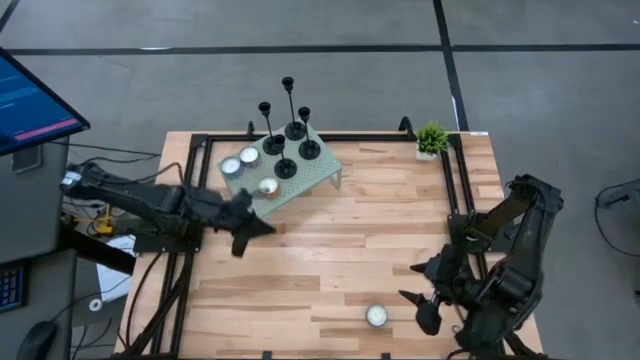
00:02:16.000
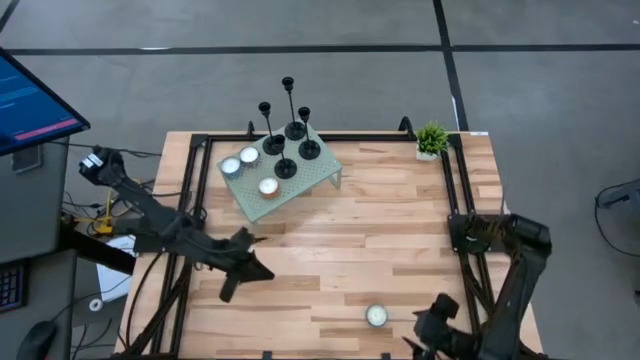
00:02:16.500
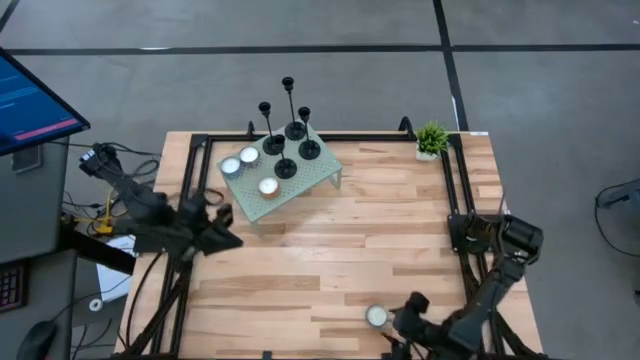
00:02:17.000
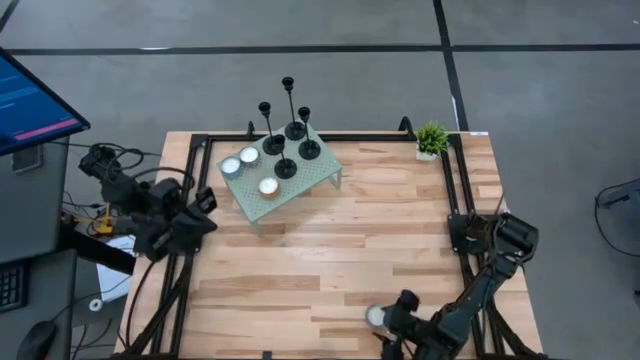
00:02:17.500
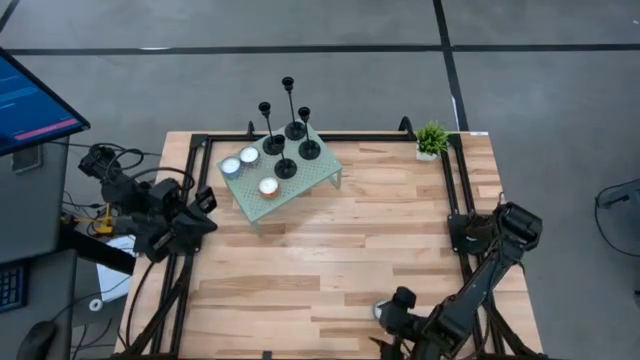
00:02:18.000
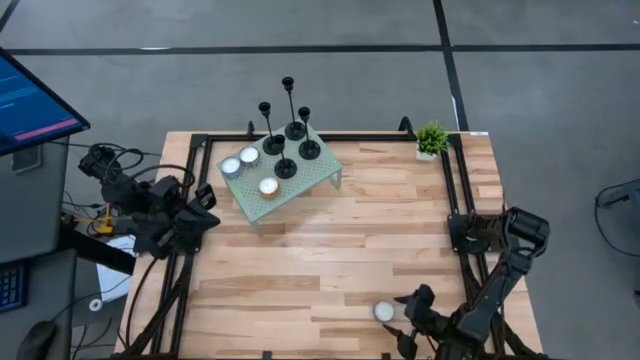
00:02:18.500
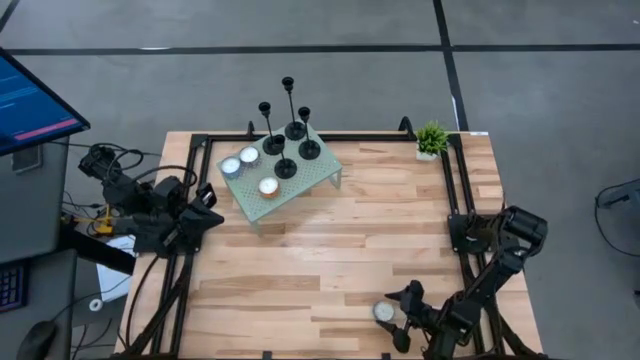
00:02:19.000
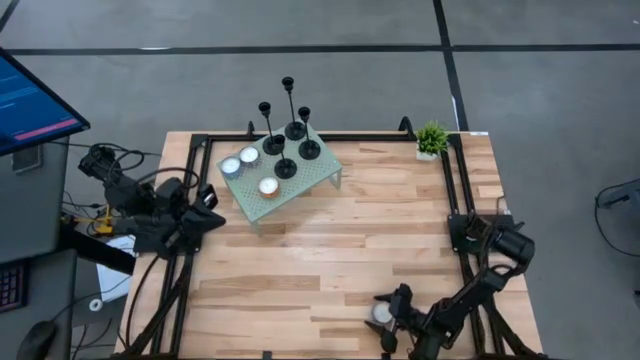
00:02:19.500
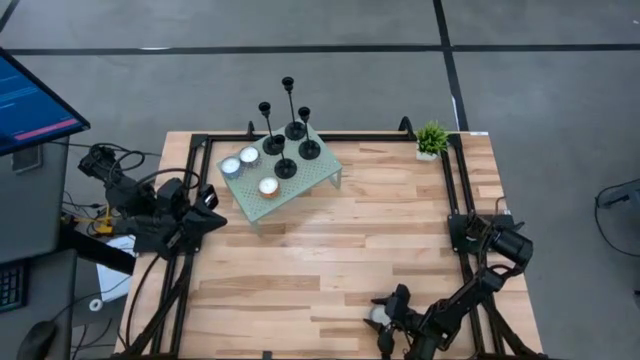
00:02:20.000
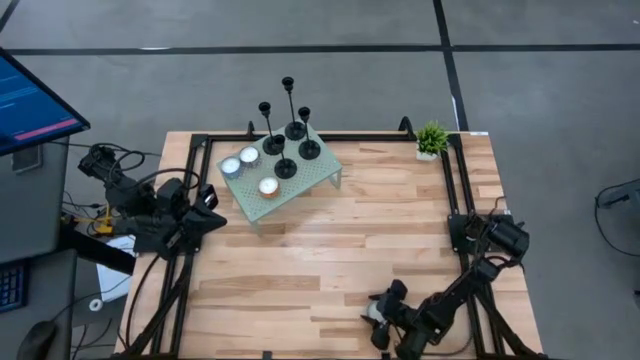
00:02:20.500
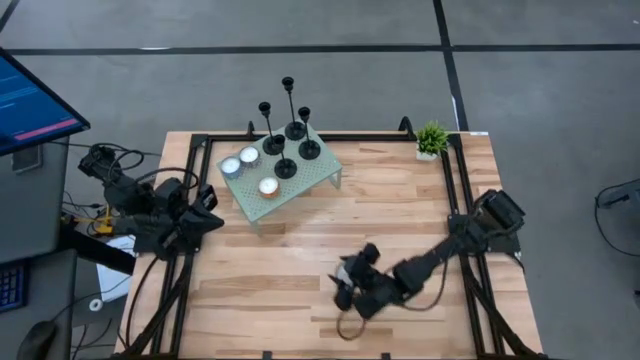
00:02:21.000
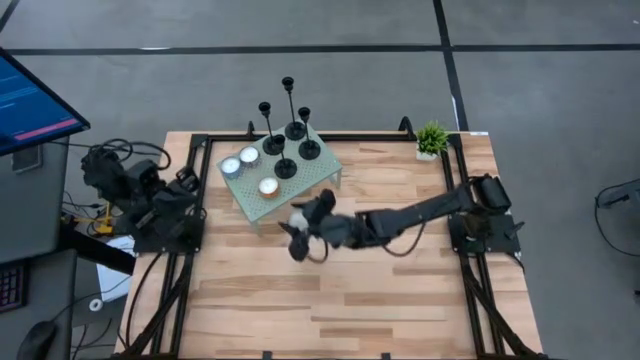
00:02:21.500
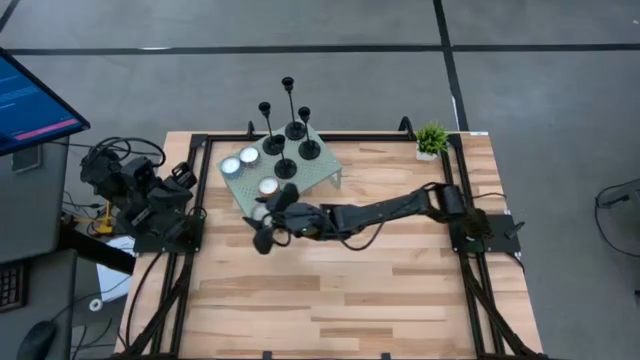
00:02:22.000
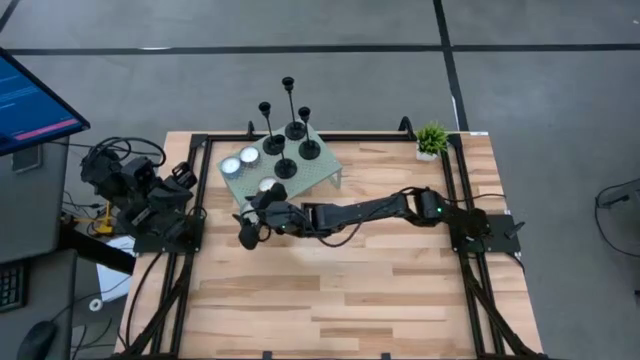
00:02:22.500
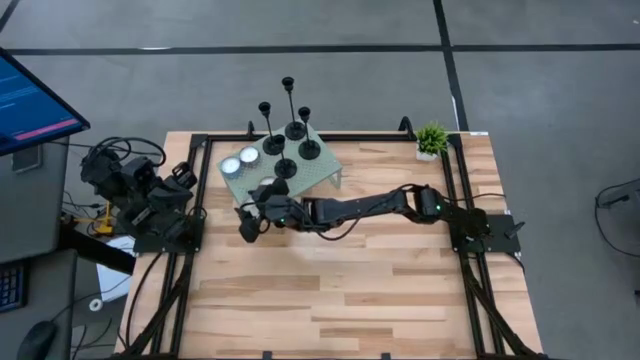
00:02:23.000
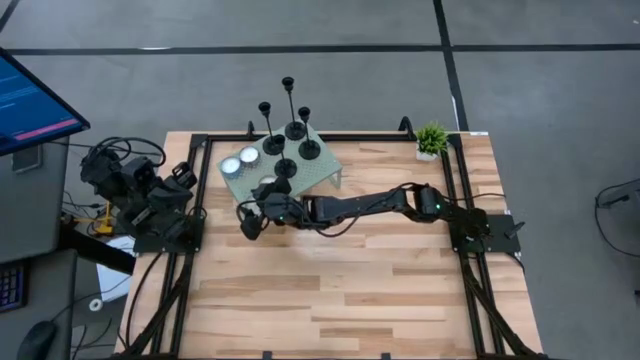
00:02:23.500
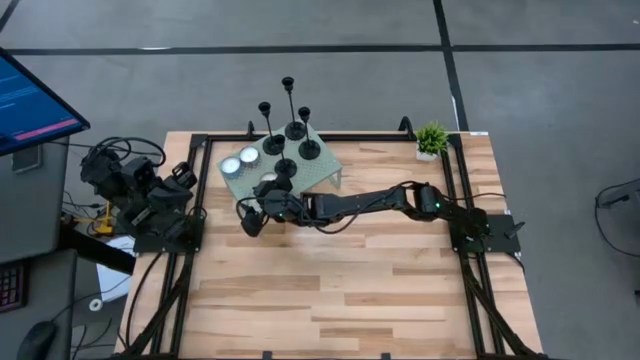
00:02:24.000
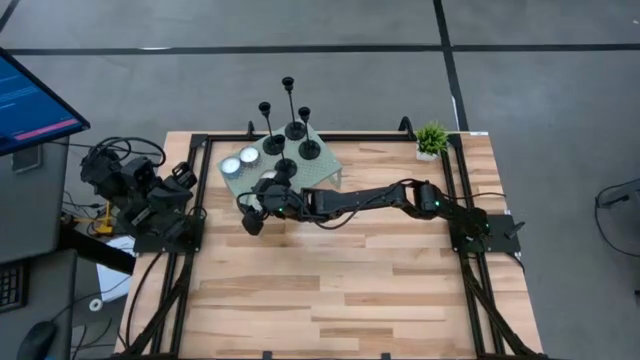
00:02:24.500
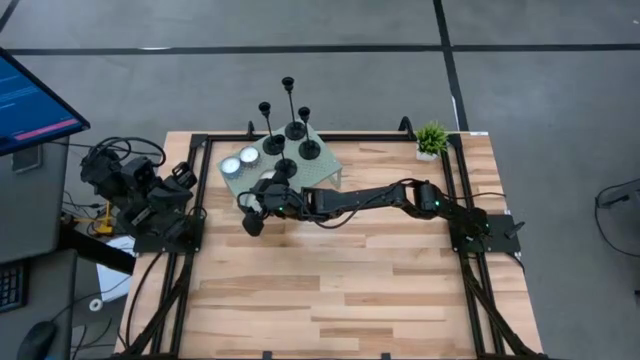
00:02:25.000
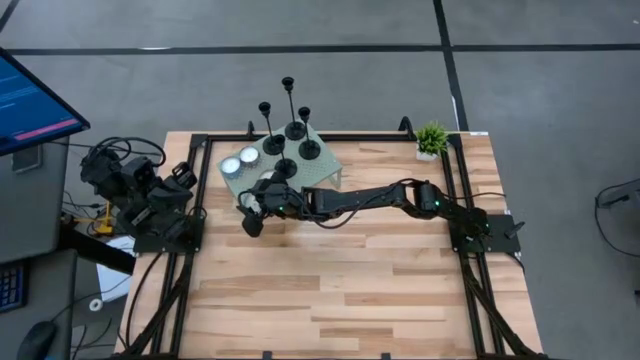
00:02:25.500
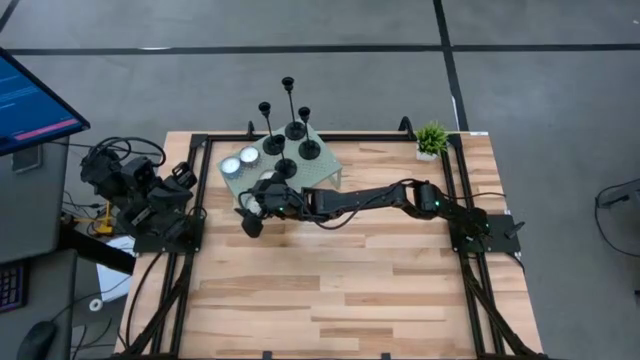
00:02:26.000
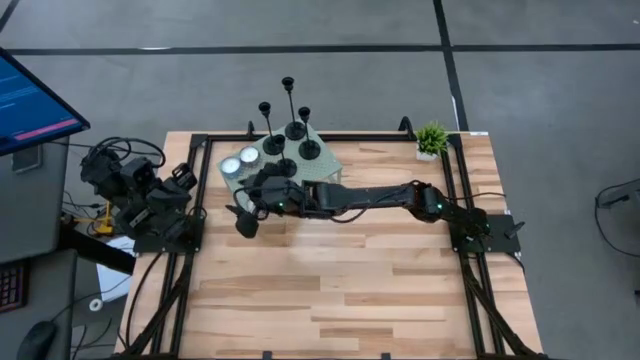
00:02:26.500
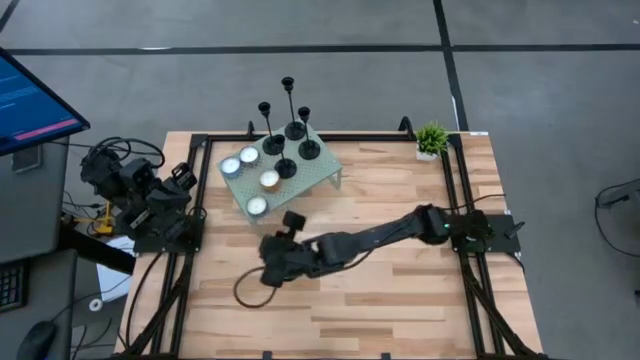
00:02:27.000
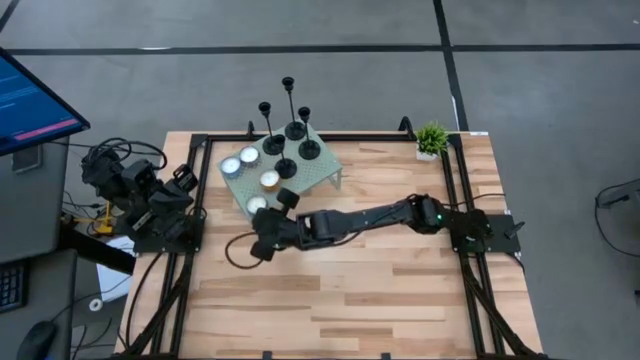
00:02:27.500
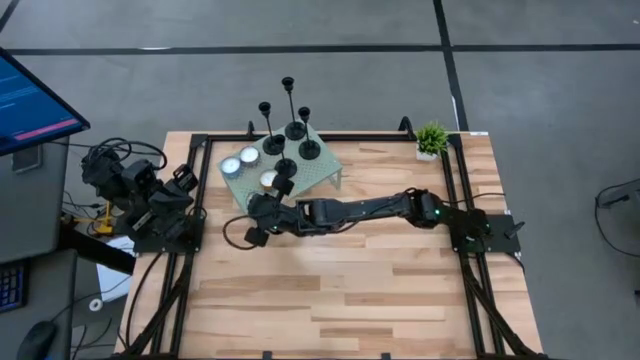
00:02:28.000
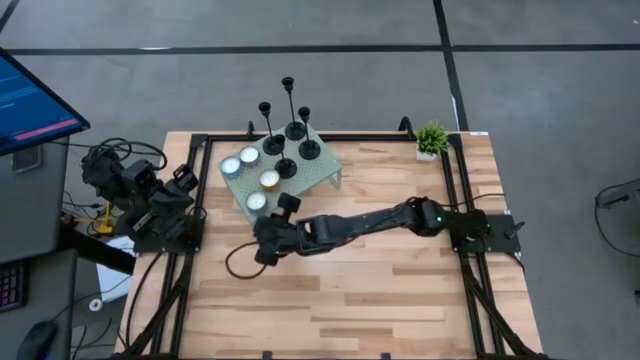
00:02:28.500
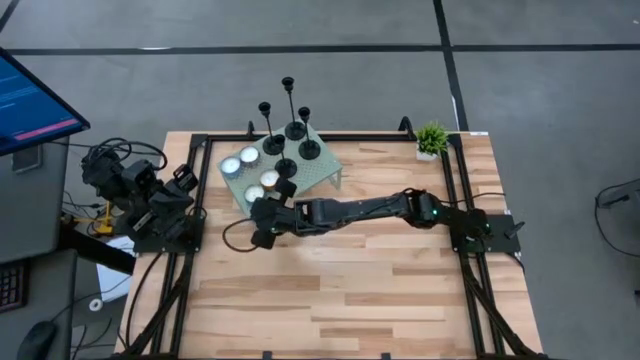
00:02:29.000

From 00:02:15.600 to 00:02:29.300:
Task: Pick & Place candle stick holders
Put the blue patterned scented candle on the shelf

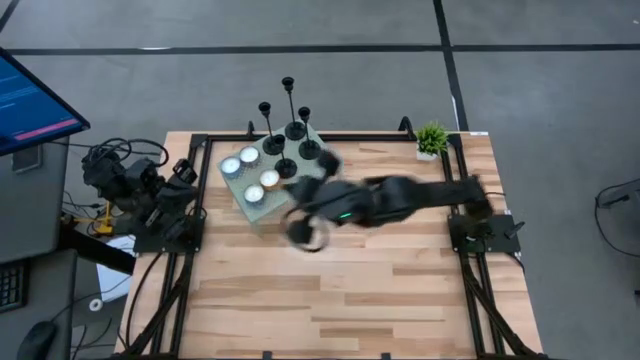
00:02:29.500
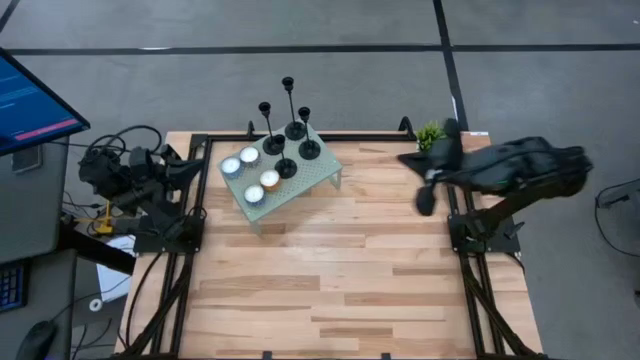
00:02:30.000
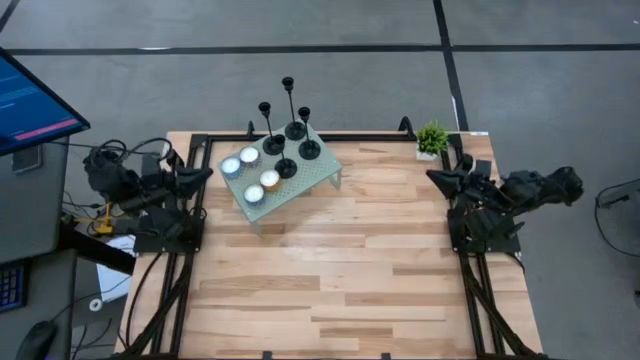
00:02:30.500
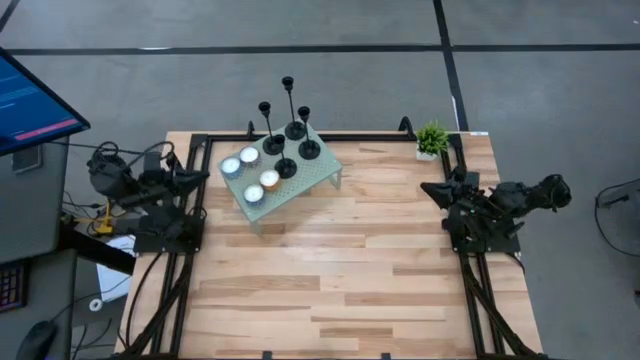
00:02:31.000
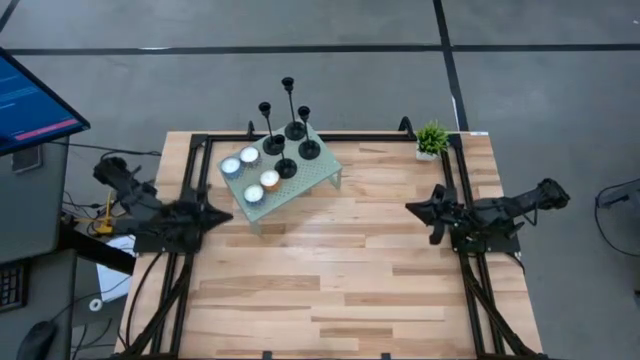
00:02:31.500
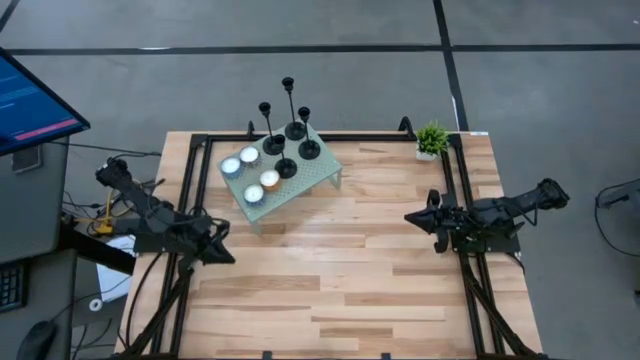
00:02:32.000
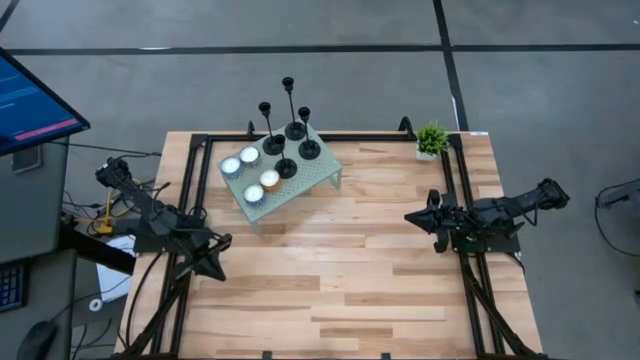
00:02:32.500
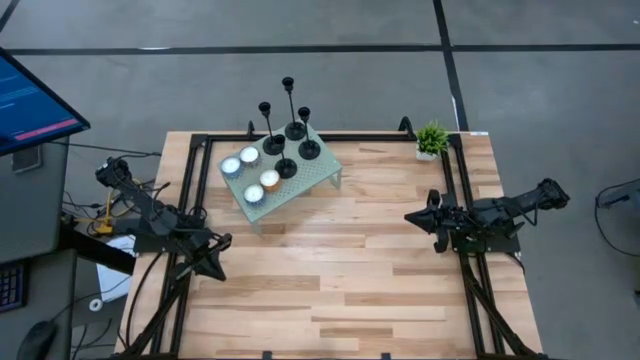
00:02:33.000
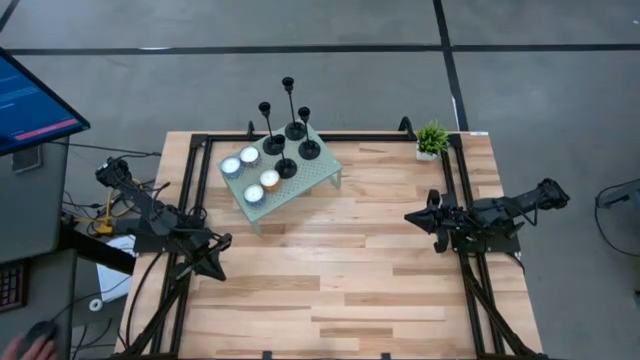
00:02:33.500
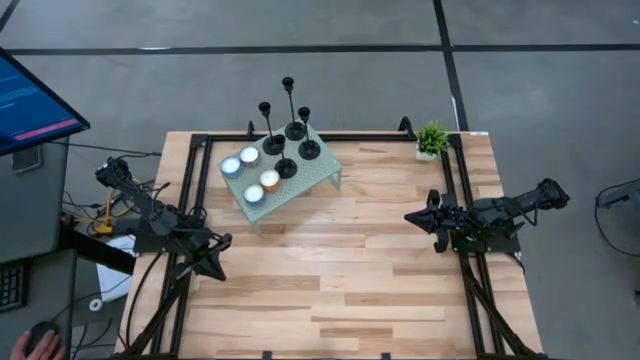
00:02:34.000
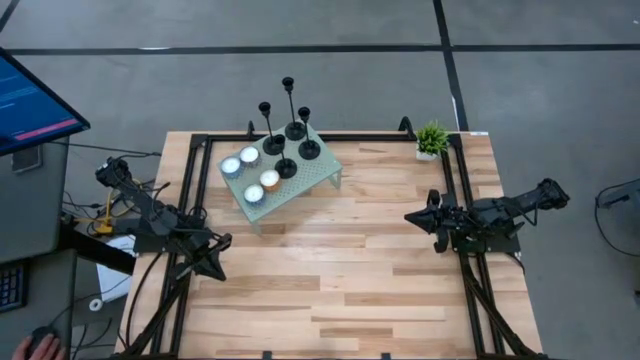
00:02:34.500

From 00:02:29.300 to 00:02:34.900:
Return to Home Position

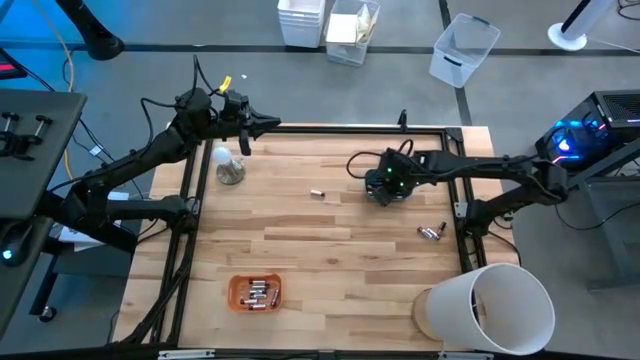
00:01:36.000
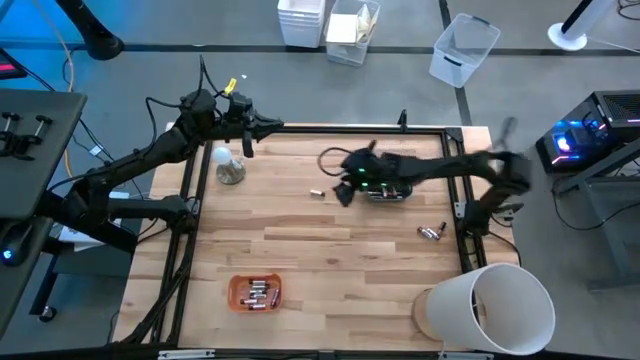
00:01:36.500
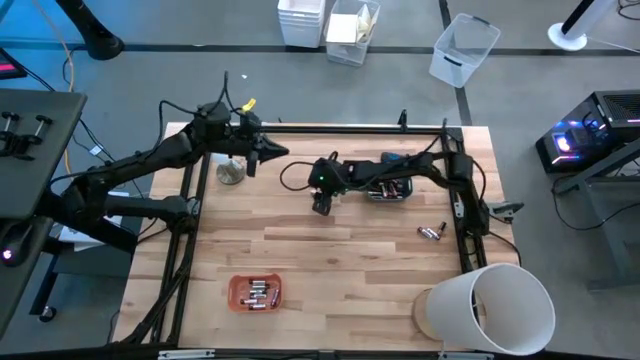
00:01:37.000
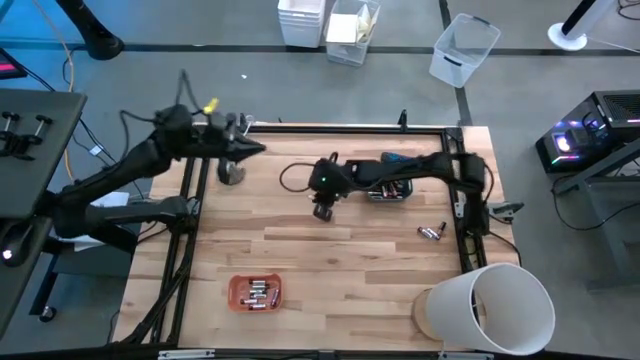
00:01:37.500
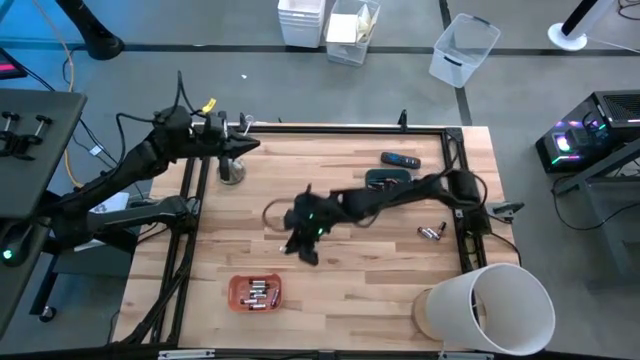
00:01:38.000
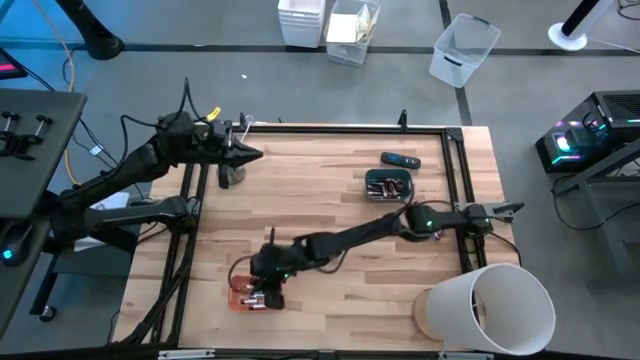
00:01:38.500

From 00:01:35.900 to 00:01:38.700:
Task: Sort batteries
Put the silver battery into the orange bin
